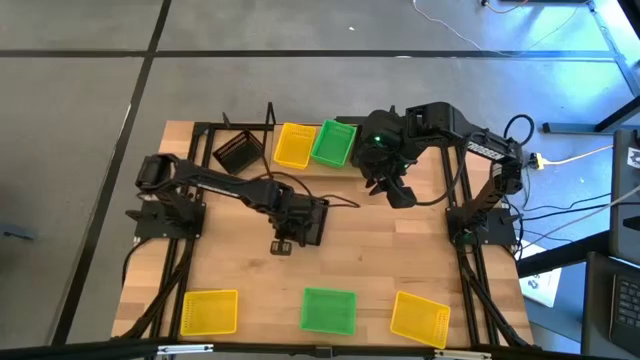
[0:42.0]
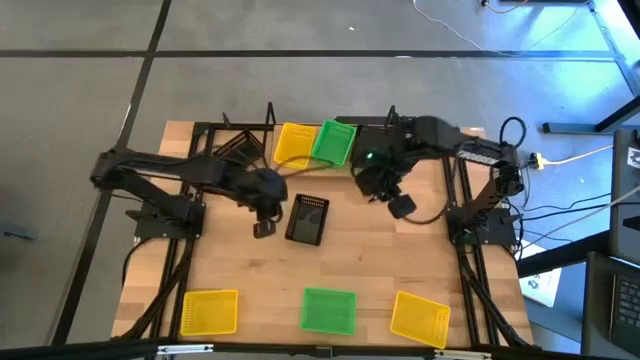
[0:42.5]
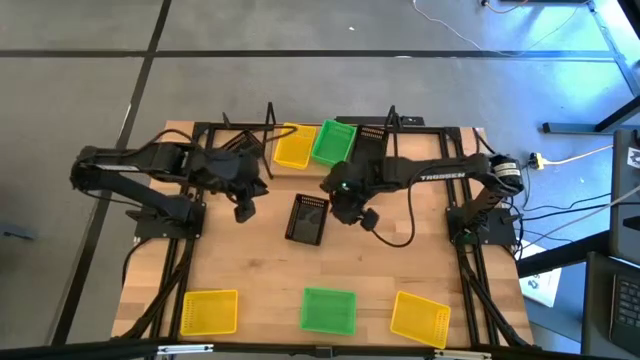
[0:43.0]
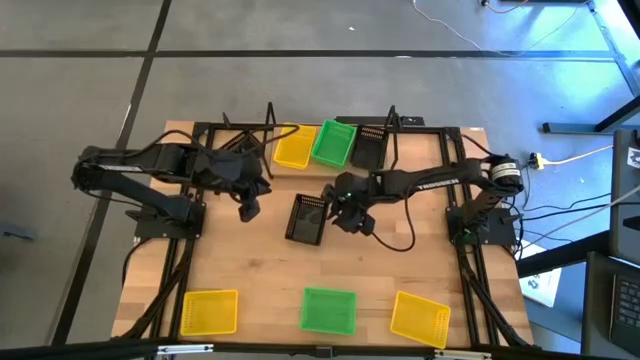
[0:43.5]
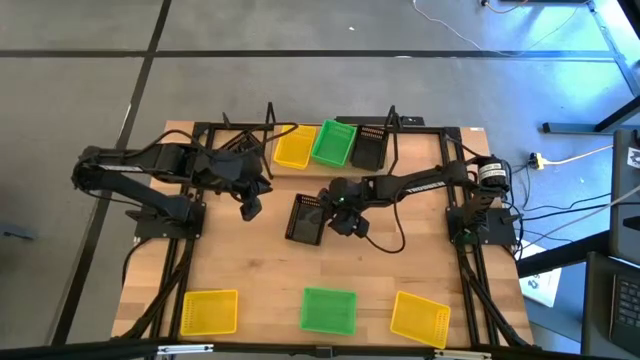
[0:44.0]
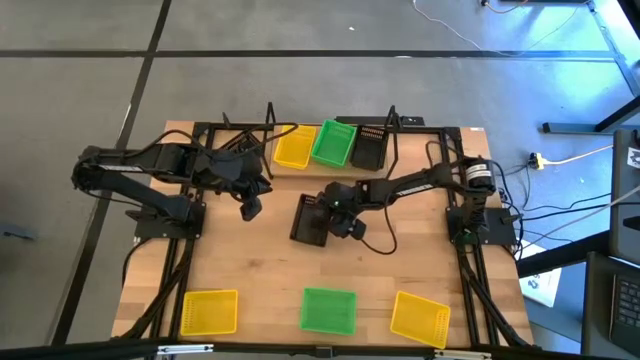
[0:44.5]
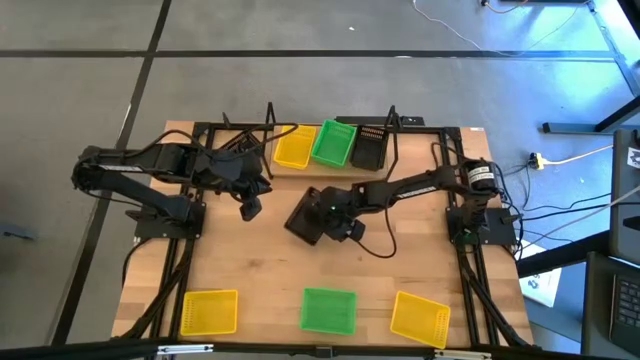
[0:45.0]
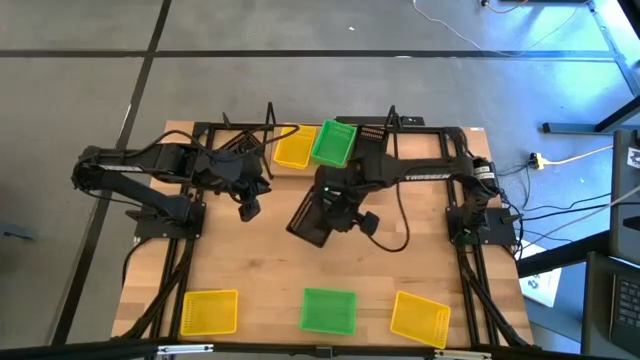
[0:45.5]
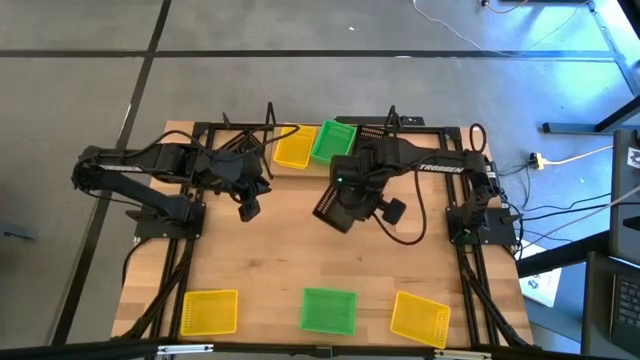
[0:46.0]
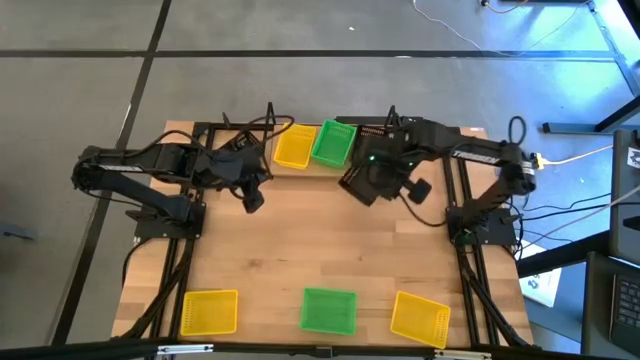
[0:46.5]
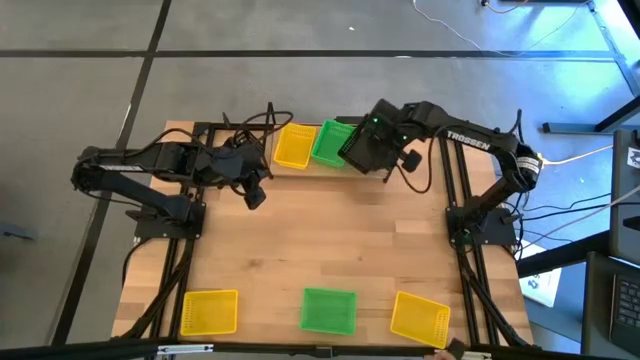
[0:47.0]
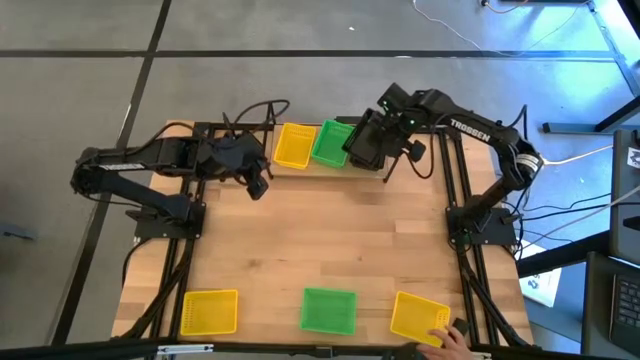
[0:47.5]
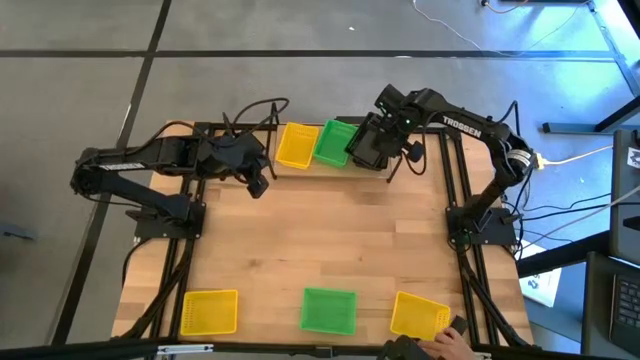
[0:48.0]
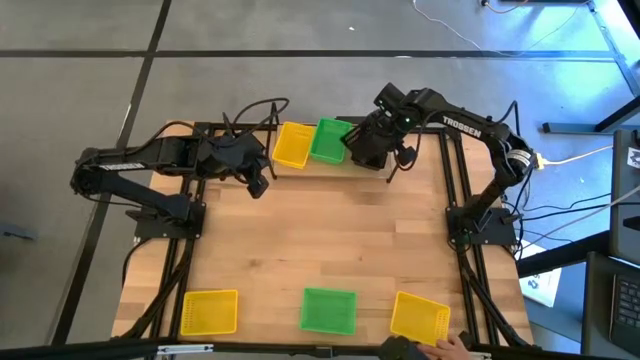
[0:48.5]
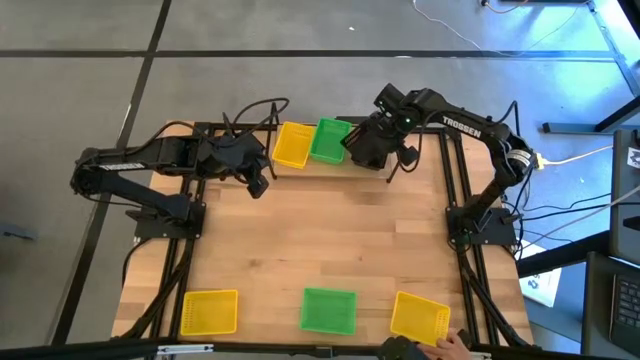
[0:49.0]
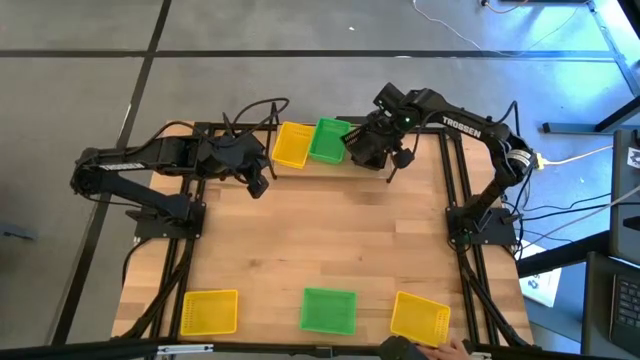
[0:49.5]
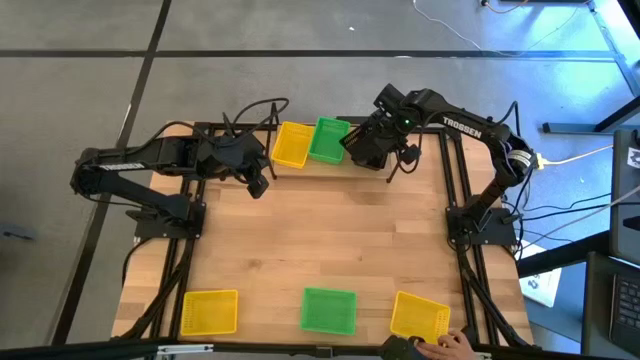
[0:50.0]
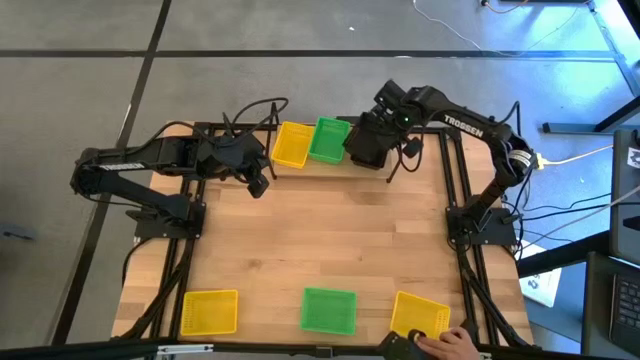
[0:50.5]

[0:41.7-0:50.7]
Task: Stack baskets on shelf by color
Stack the left black bin on top of the black bin on the shelf

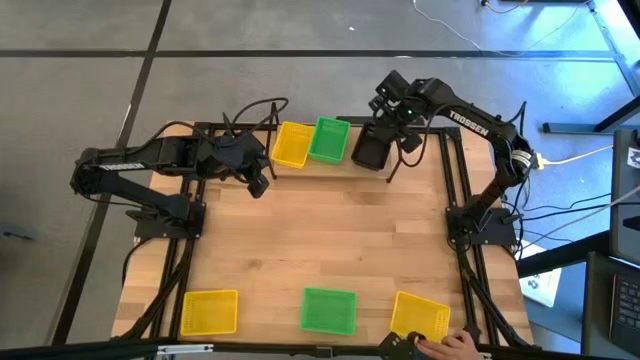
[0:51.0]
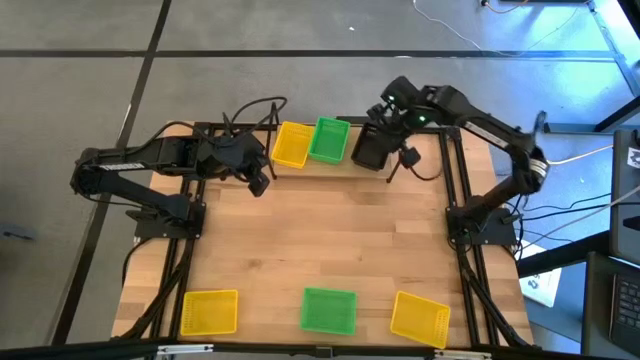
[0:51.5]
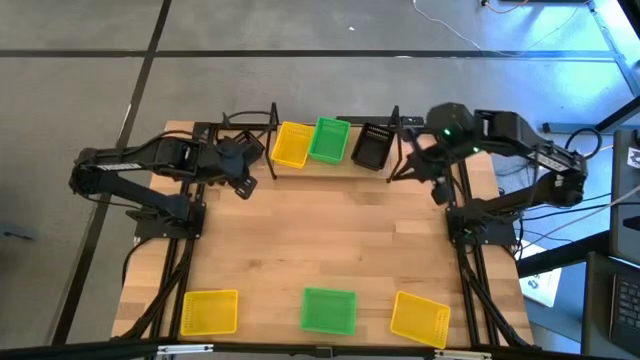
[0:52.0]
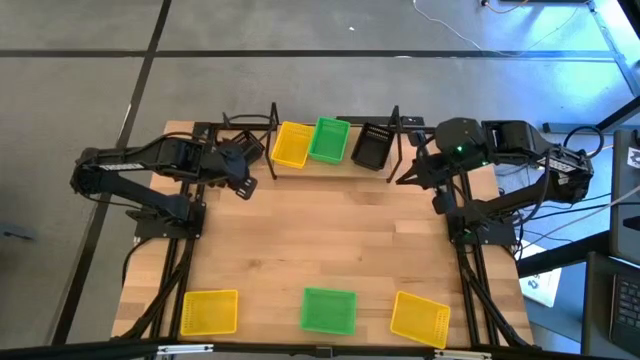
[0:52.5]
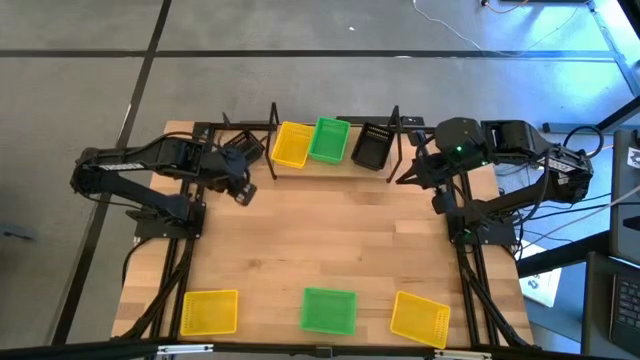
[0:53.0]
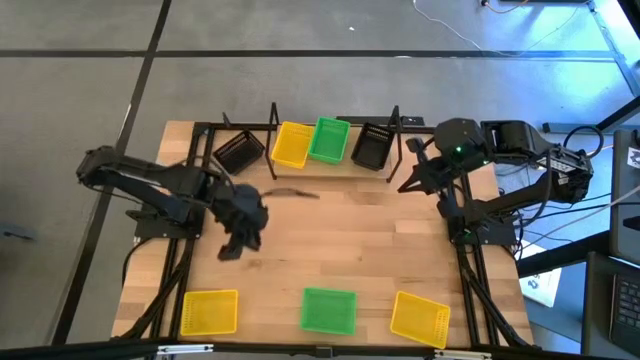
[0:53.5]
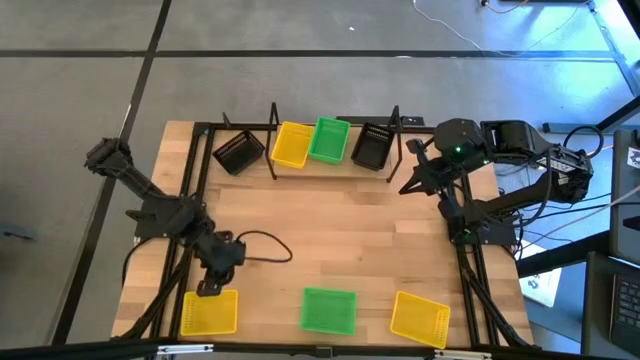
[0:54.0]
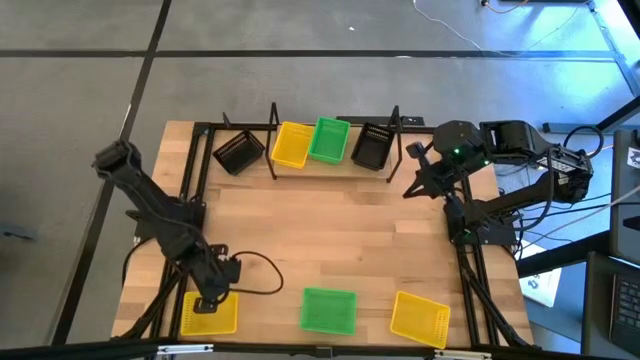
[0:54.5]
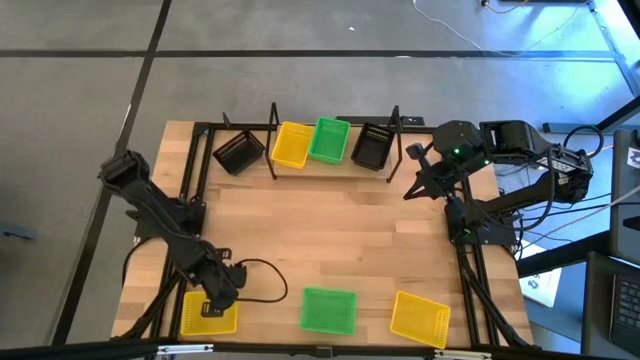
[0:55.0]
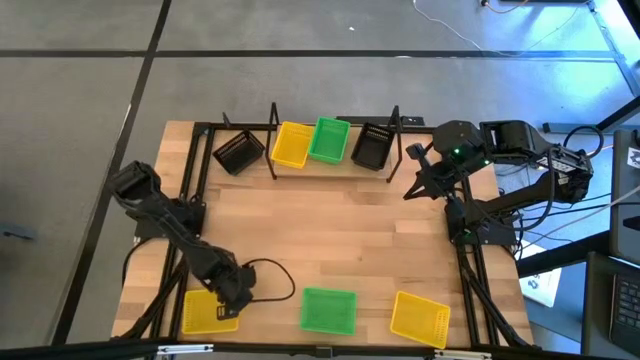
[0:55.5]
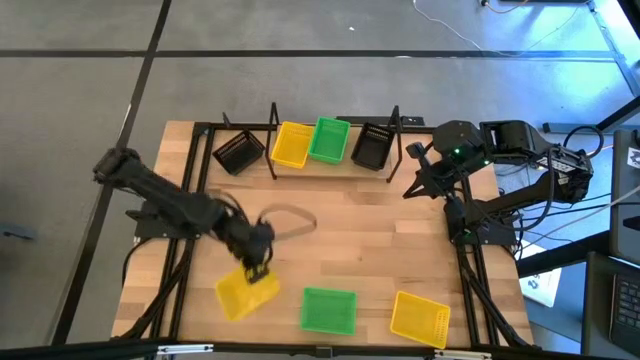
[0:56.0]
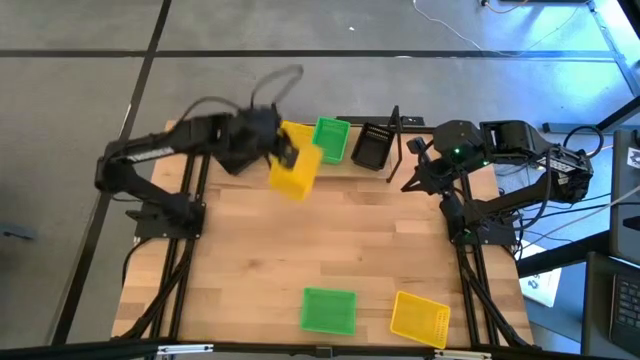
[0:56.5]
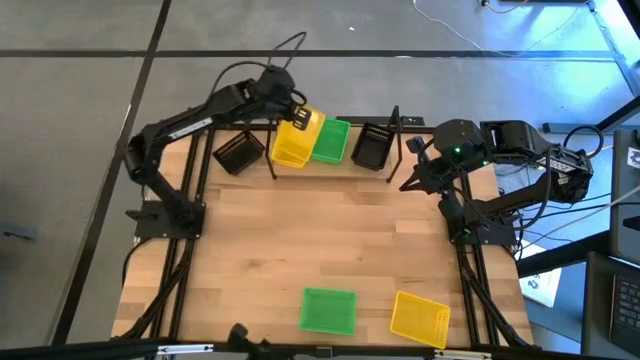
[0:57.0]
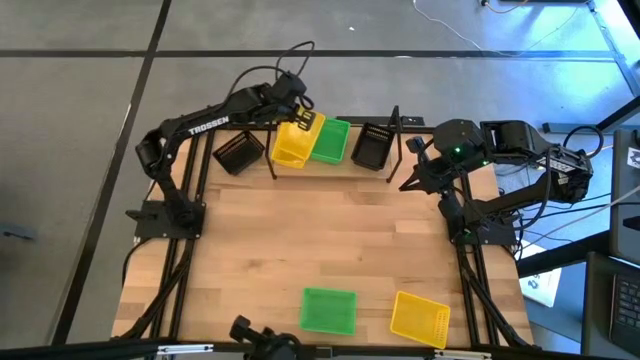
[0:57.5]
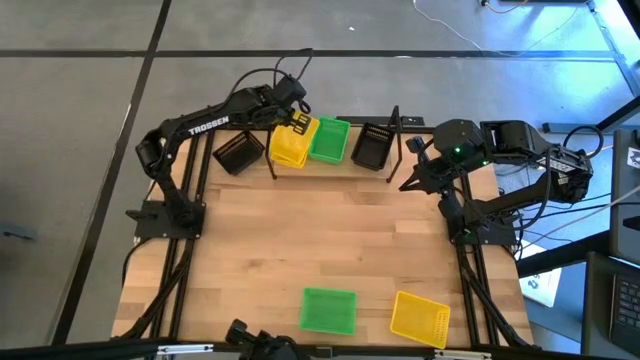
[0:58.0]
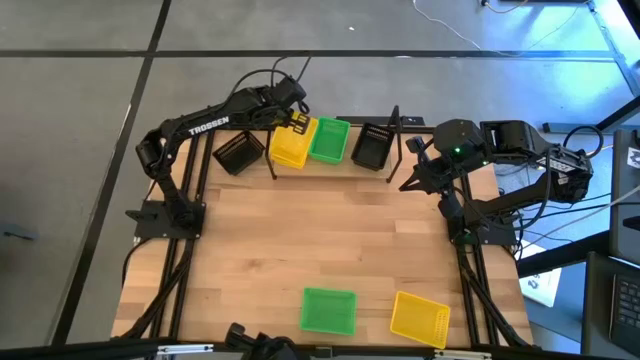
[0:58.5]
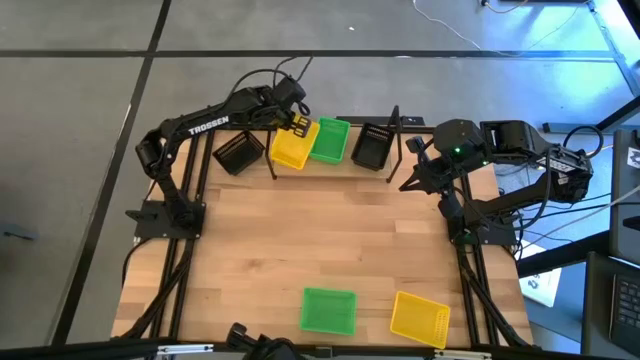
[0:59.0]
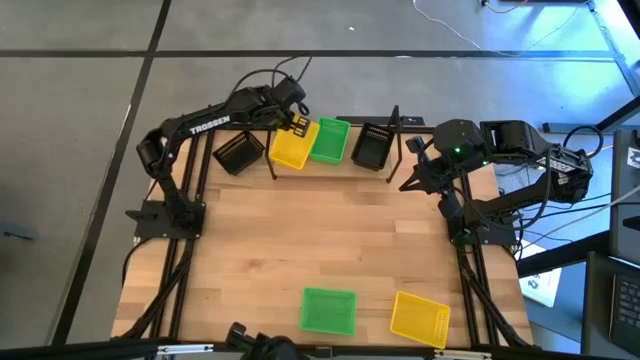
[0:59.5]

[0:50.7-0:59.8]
Stack the left yellow bin on top of the yellow bin on the shelf

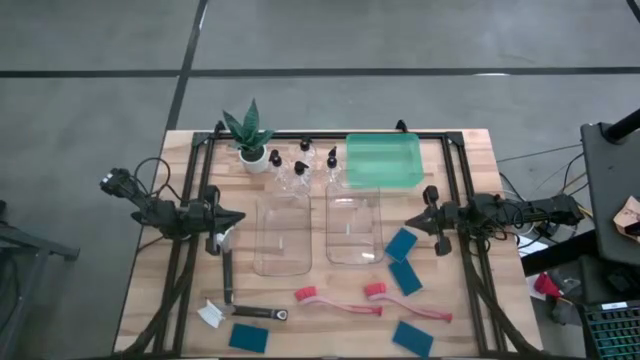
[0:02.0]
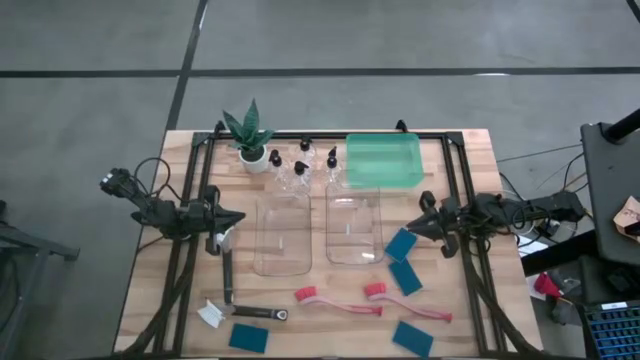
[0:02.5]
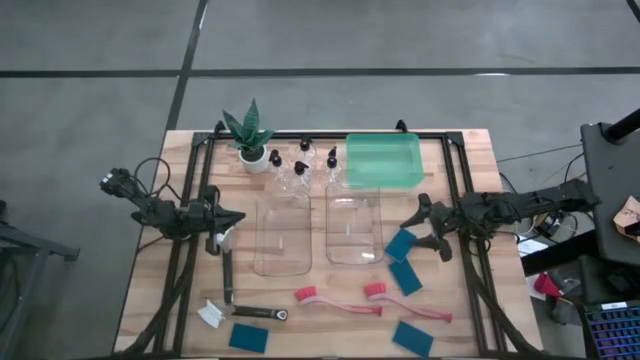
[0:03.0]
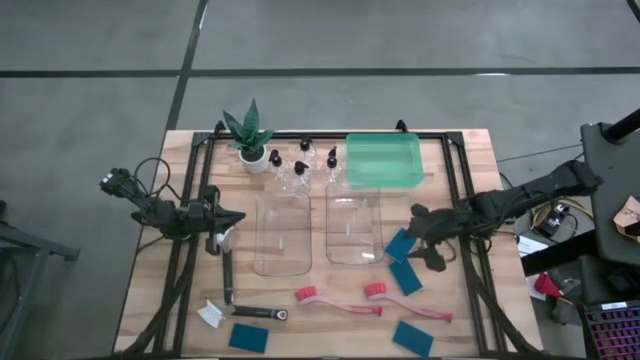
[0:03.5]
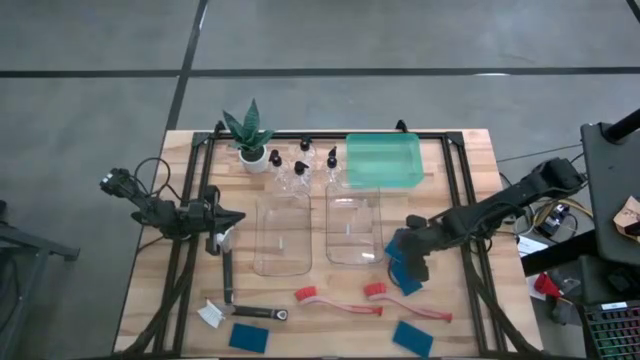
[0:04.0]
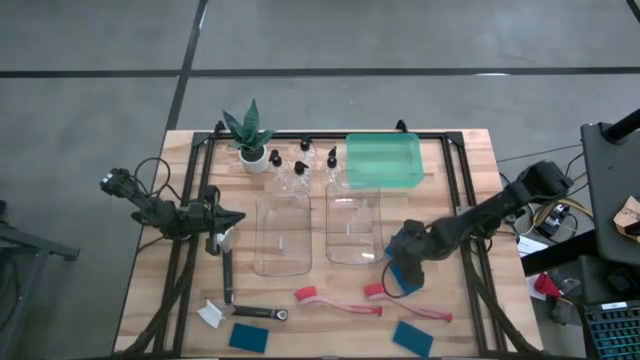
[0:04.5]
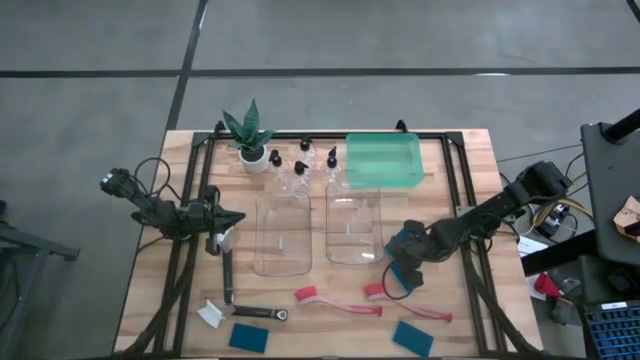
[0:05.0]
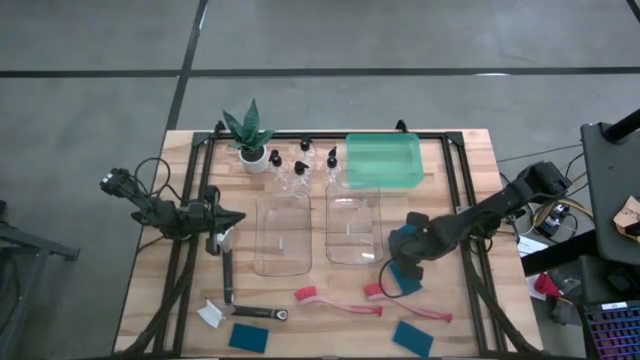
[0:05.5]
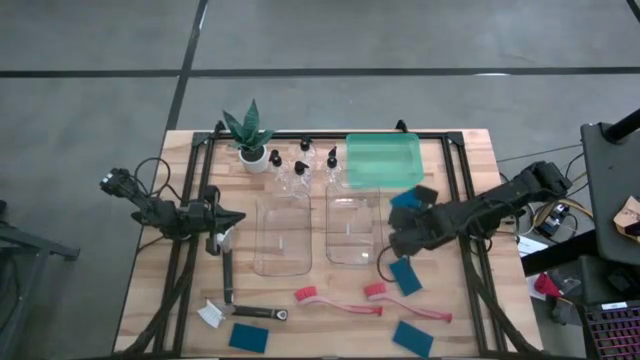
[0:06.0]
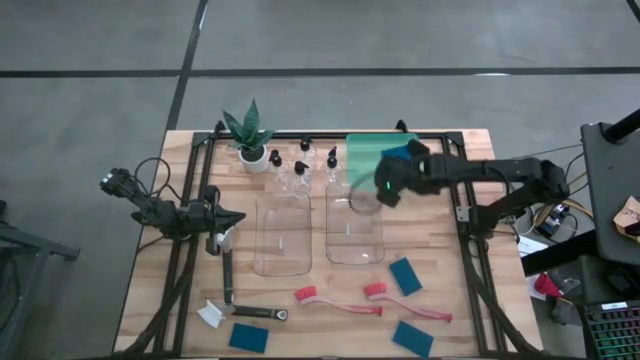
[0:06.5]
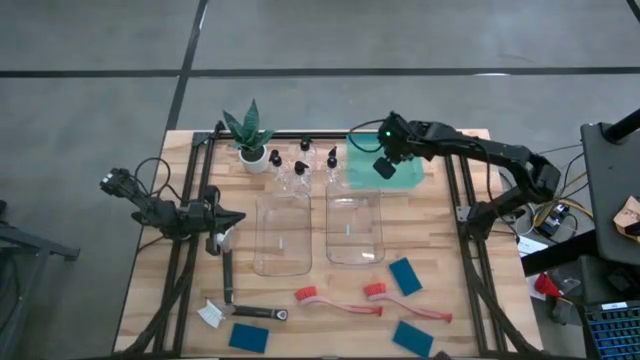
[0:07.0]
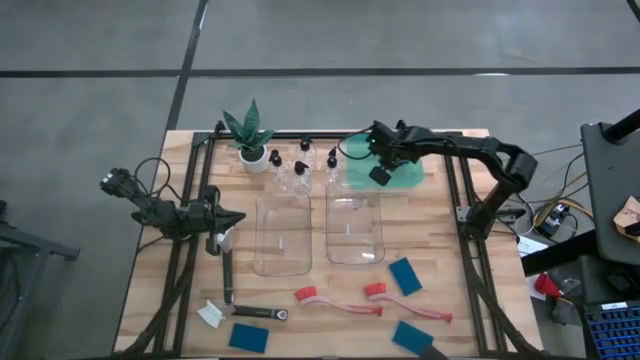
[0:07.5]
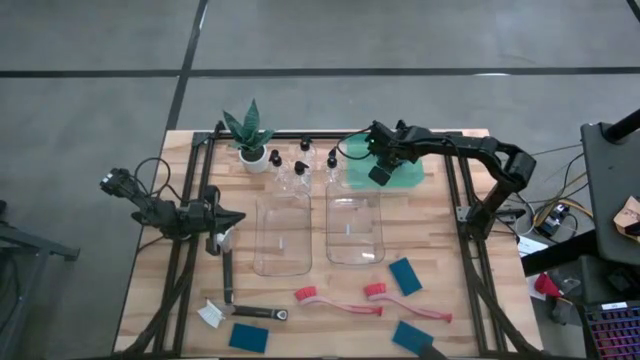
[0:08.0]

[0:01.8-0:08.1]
Task: Pick & Place Kitchen Sink Supplies
Put the blue sponge into the green bin
